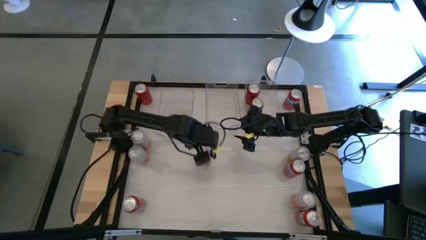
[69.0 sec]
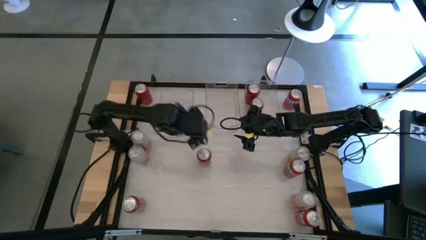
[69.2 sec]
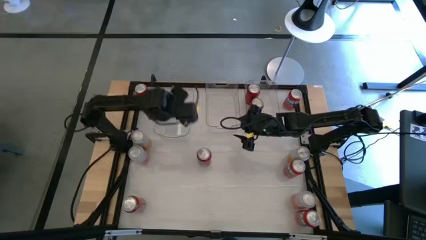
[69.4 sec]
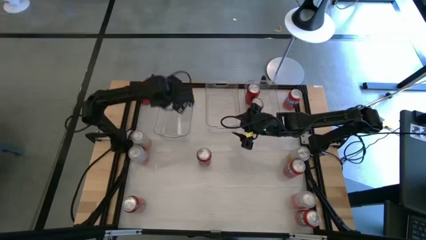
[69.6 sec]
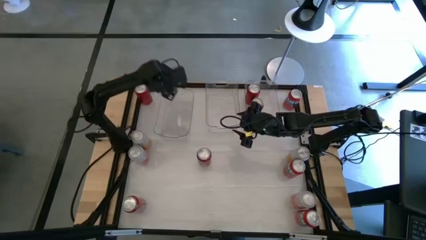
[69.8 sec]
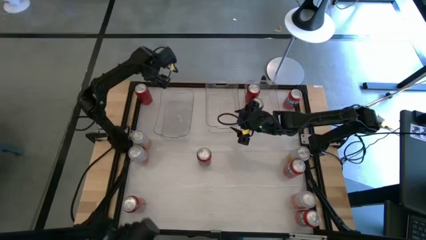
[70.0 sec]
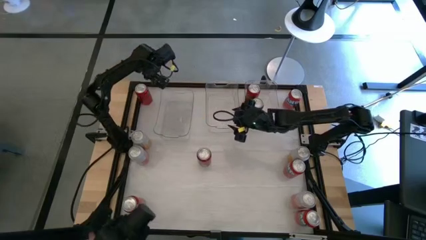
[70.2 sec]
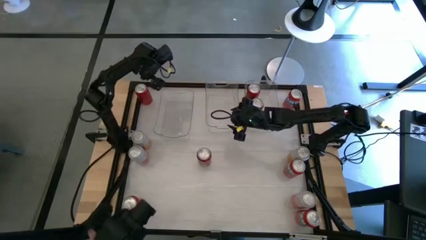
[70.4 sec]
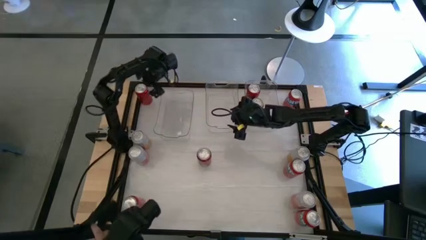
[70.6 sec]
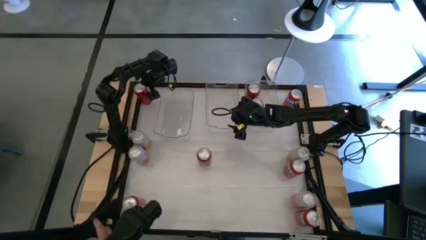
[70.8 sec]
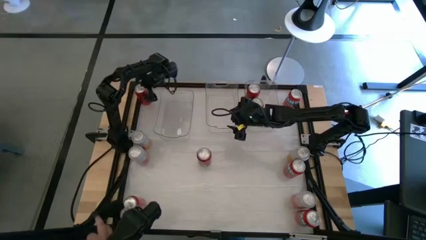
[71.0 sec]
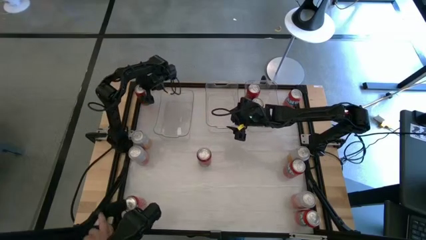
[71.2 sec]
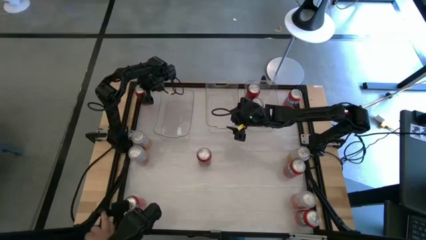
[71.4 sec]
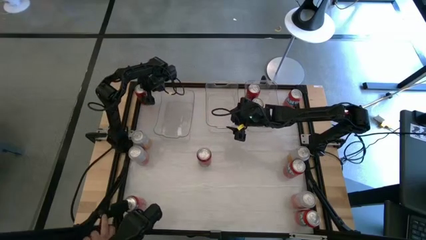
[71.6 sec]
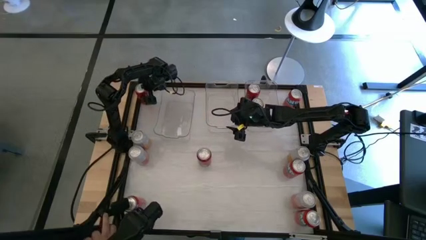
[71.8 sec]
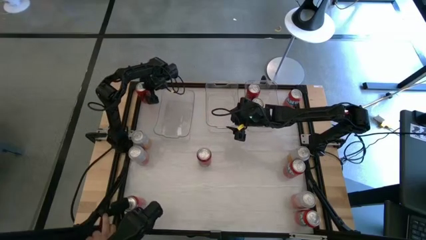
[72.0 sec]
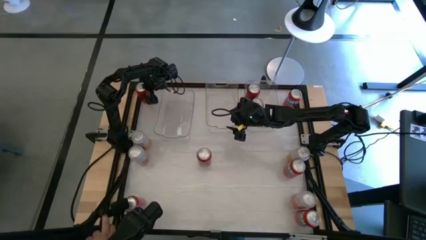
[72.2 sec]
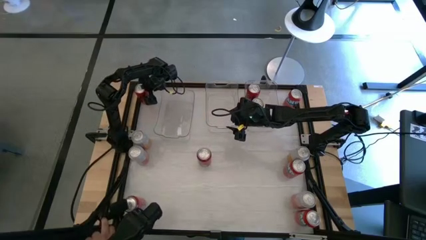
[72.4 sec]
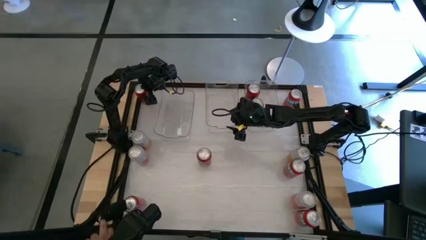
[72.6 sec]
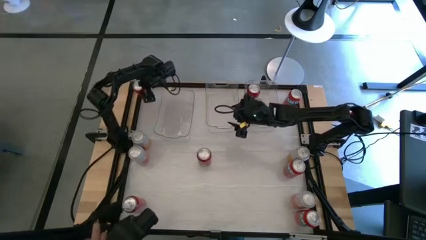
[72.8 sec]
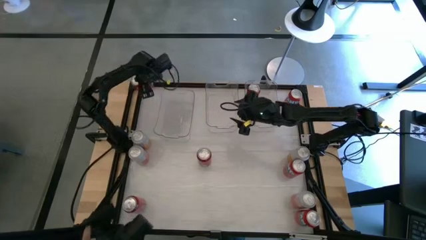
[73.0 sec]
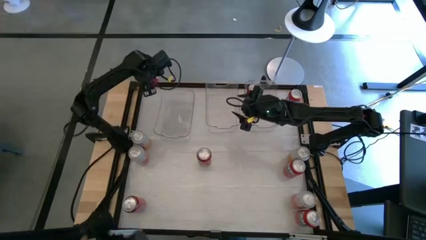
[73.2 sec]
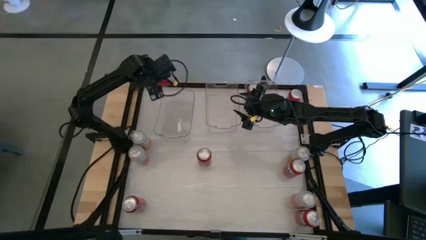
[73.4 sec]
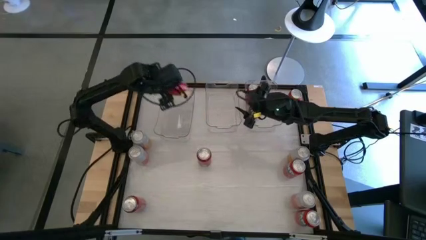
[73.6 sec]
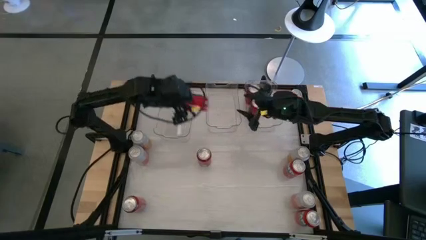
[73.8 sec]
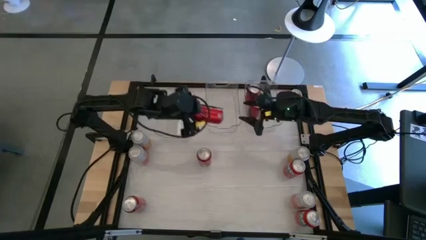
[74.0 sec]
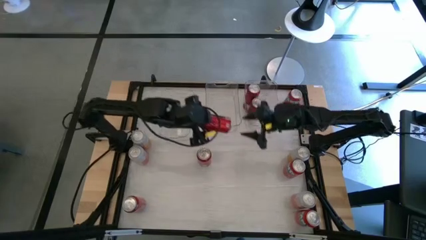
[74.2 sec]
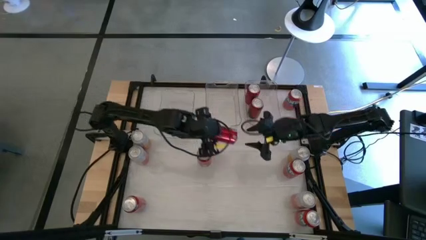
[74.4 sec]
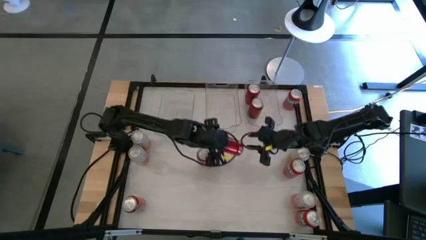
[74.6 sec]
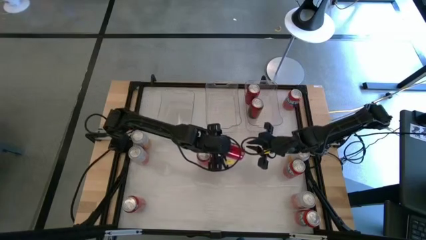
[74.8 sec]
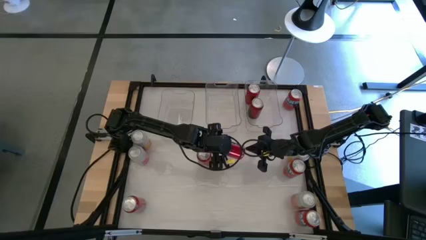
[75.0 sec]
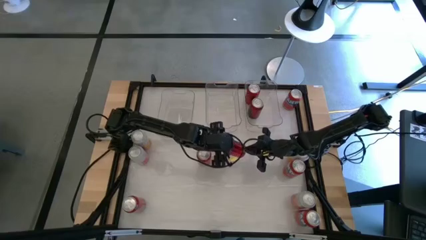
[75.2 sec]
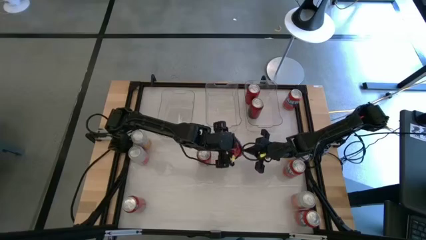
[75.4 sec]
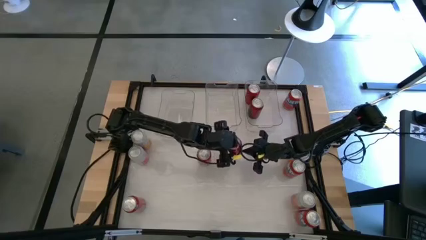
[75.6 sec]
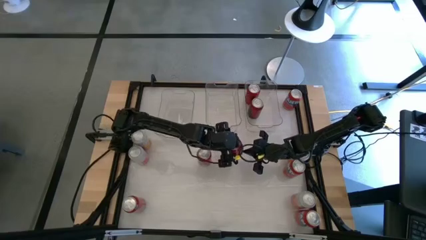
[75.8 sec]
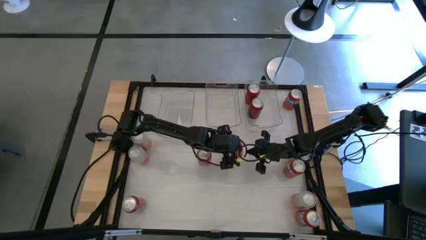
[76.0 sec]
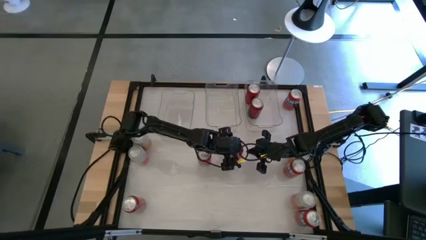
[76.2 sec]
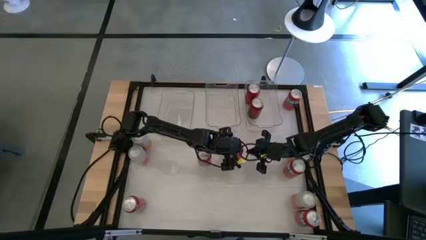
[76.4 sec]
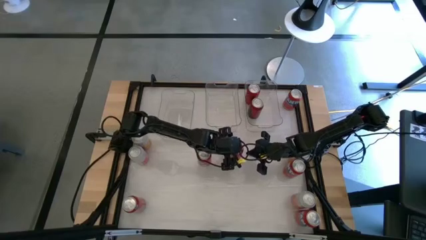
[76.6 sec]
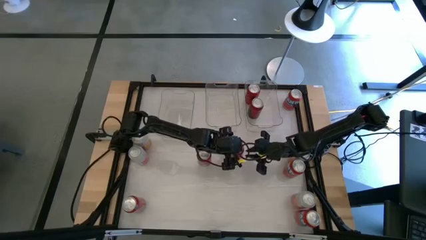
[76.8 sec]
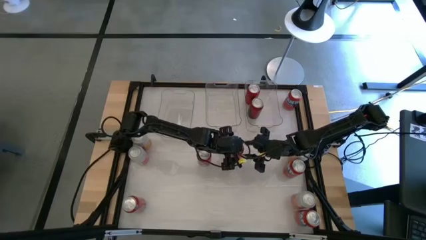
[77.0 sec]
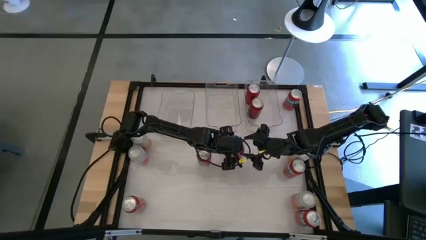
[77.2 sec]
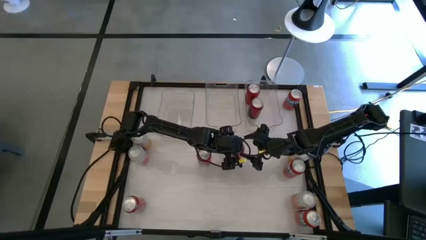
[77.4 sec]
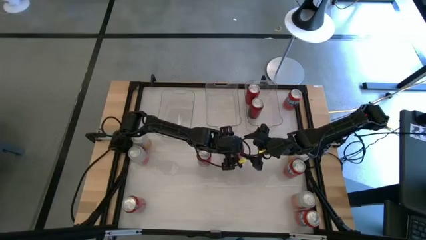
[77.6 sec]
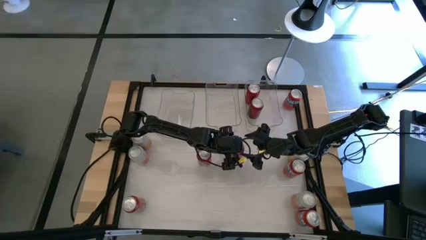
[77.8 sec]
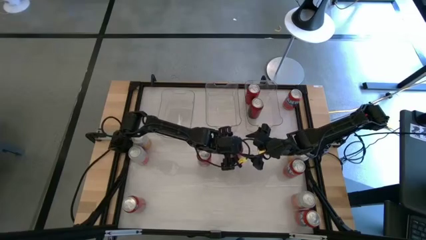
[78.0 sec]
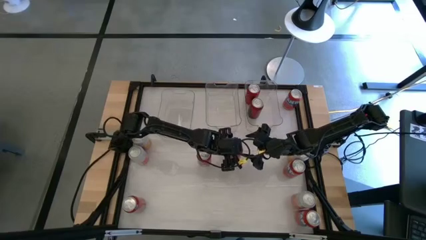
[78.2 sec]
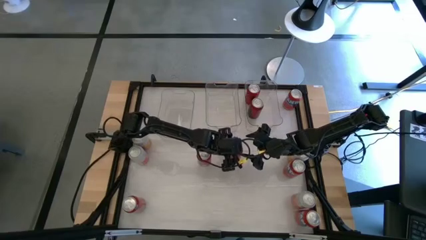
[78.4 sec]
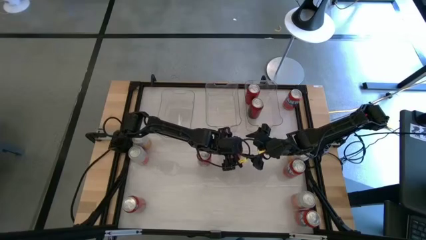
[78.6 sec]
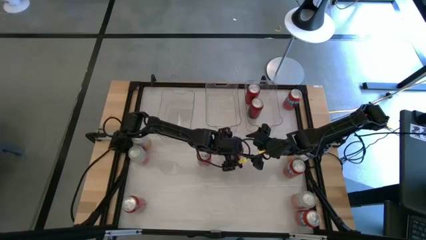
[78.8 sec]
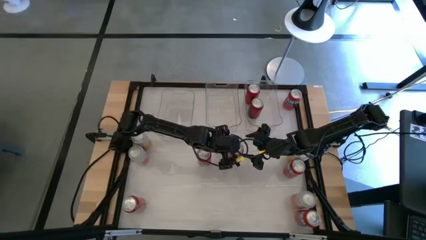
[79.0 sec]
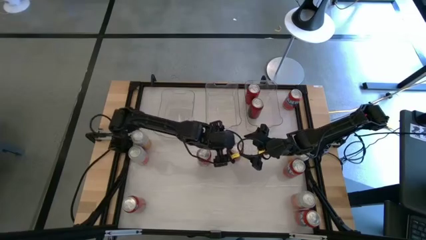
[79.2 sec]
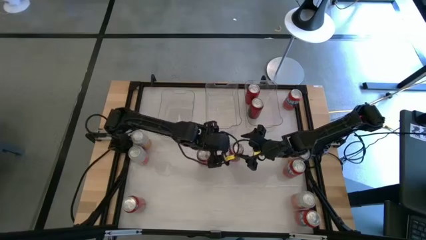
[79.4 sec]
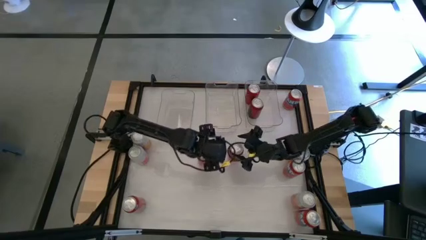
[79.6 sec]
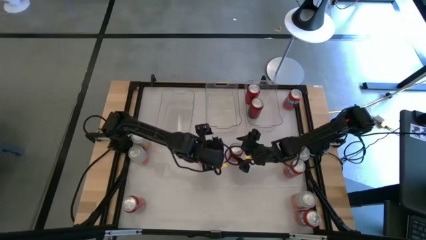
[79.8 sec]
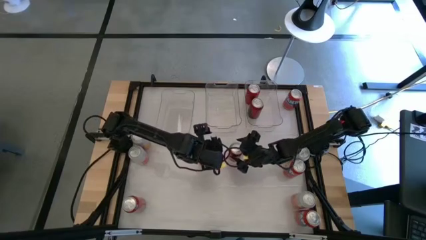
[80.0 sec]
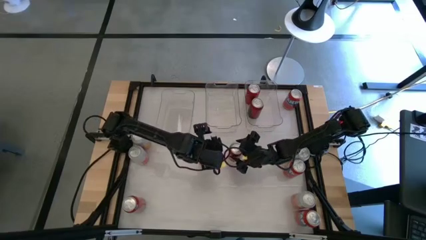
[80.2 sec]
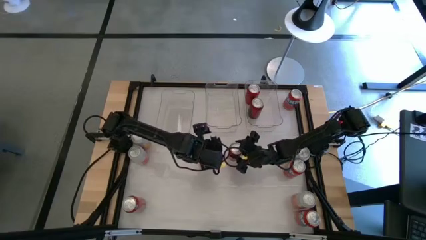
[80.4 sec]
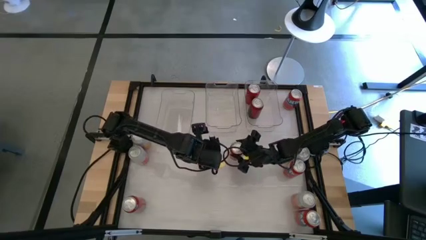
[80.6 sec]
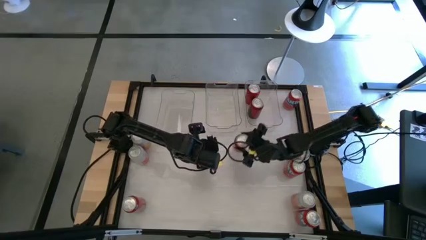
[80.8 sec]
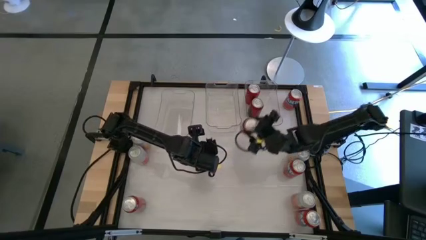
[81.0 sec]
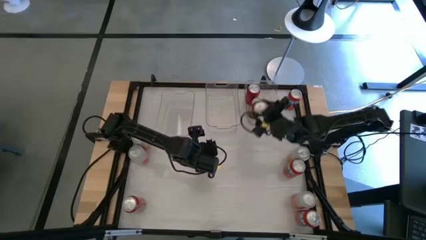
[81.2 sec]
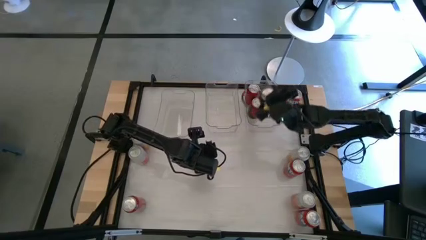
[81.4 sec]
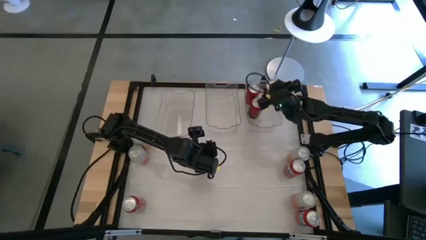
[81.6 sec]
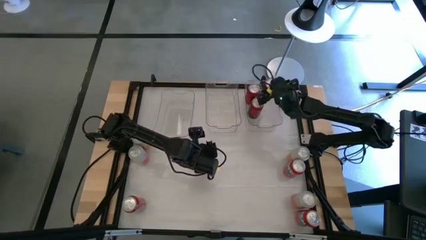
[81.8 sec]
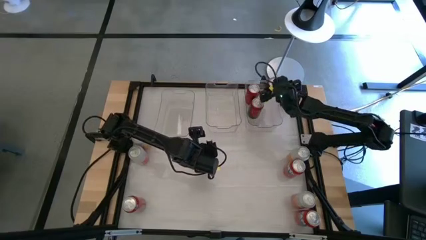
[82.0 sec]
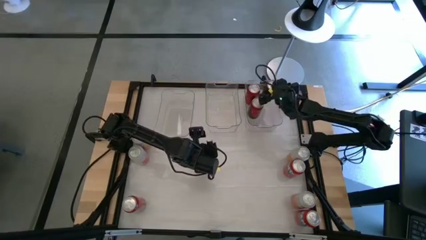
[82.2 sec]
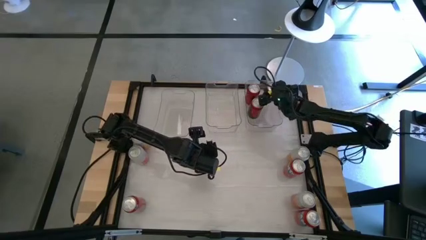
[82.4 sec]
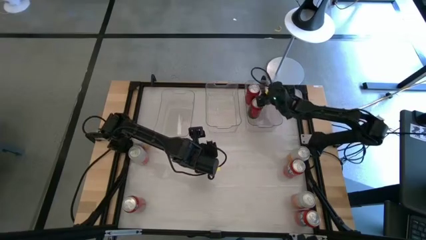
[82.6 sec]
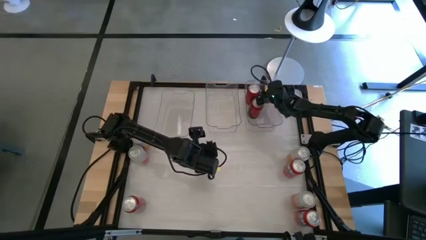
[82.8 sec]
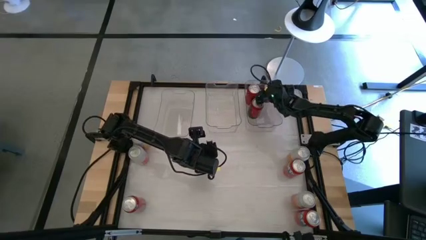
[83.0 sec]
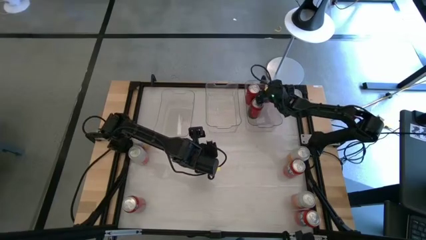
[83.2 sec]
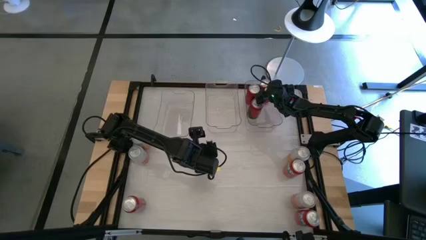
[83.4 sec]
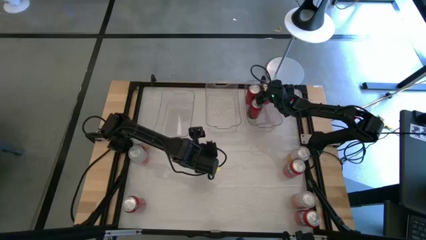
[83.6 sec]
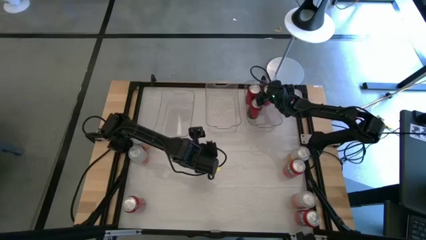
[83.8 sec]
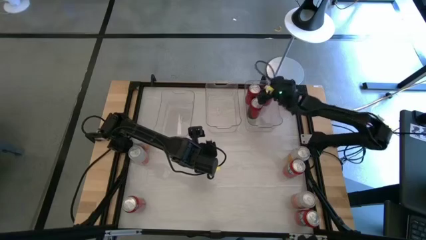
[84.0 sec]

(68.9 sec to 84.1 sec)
Task: Sort soda cans
Put the top red black soda can into the right transparent bin

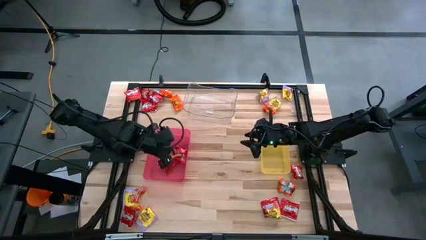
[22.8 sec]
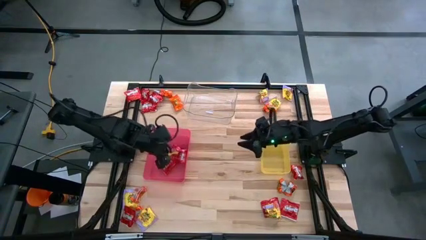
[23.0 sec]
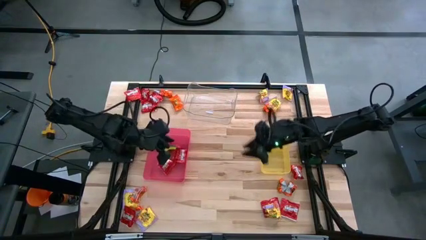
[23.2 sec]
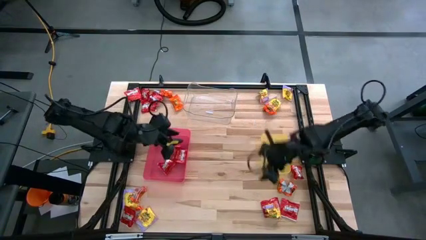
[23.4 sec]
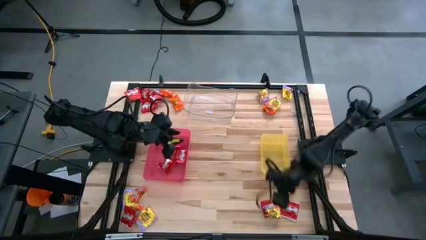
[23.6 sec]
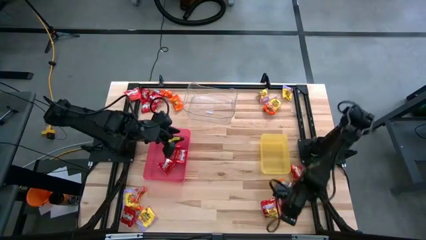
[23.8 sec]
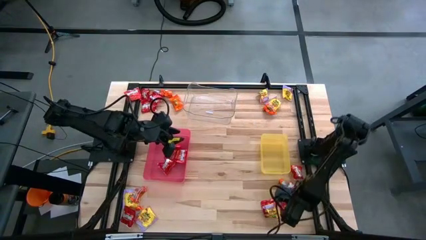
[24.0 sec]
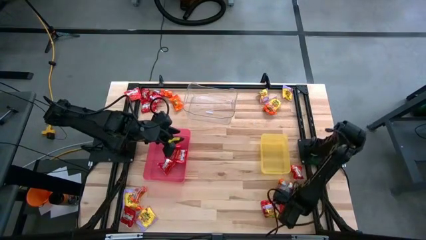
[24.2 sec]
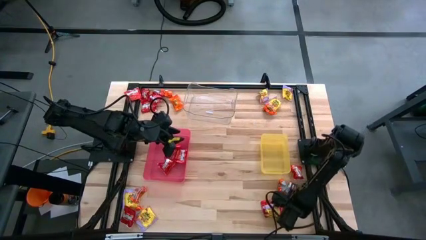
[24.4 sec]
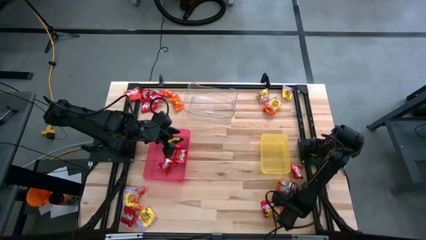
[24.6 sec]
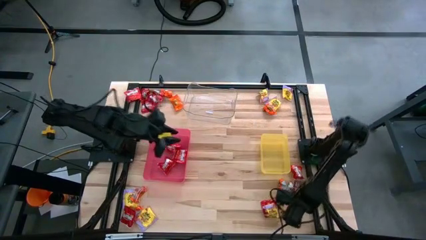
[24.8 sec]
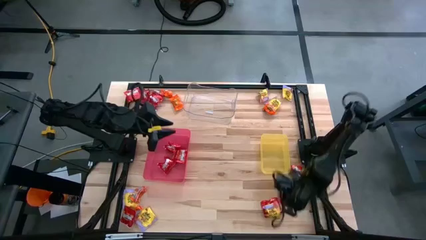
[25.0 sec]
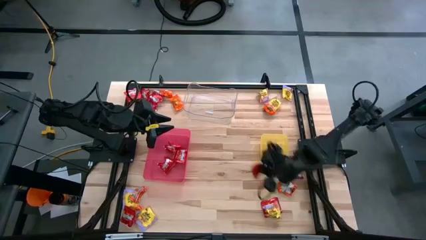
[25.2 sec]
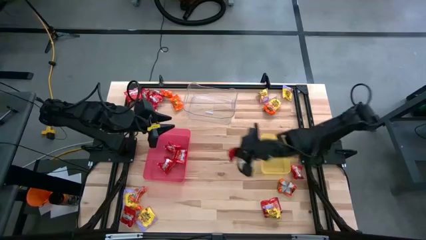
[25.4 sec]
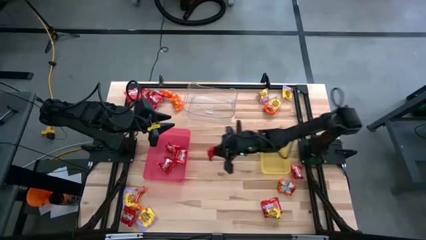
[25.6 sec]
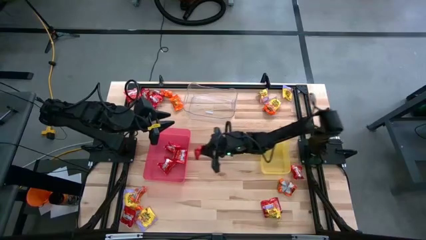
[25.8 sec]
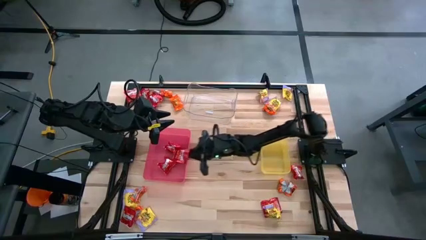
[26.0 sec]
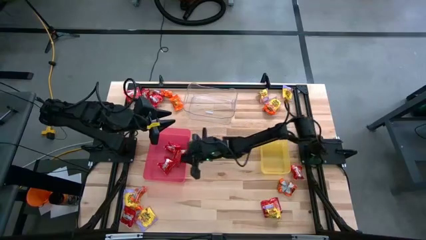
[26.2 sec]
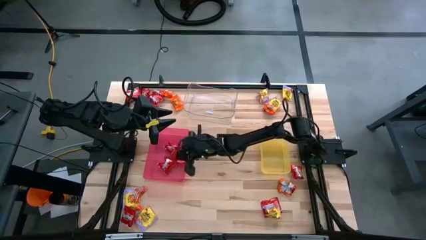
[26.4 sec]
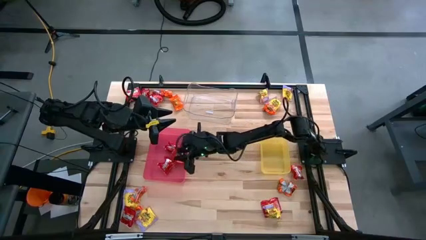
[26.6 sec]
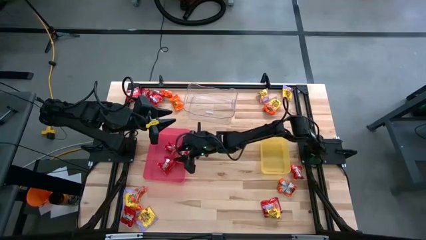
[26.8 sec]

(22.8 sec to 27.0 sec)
Task: Sort candy
Put the red candy into the red bin
